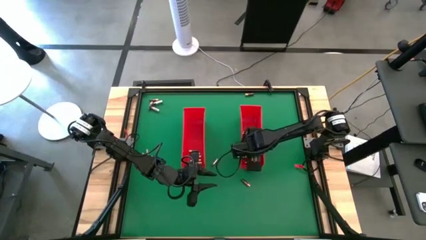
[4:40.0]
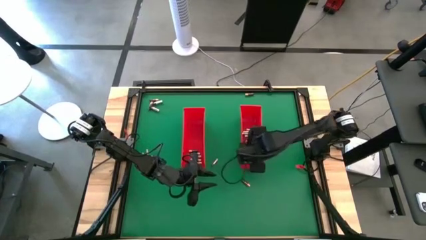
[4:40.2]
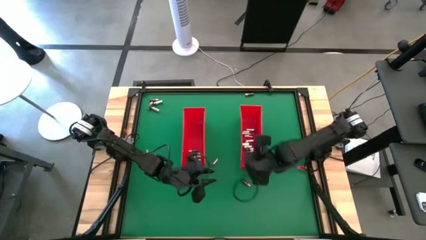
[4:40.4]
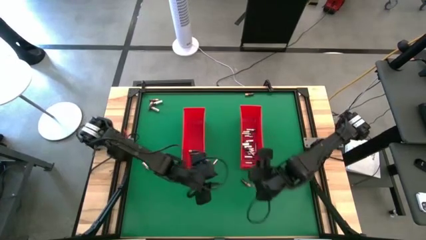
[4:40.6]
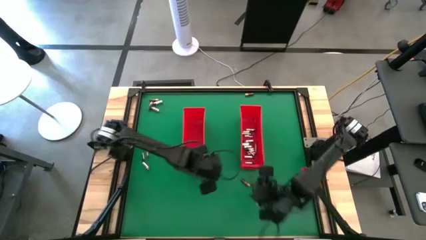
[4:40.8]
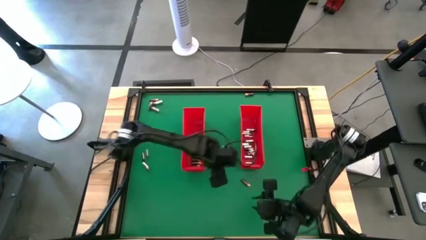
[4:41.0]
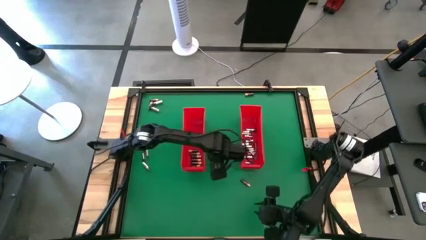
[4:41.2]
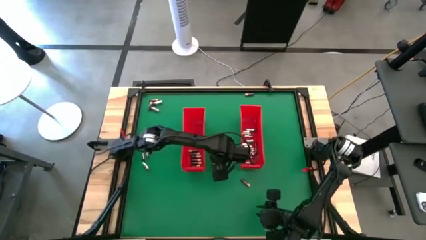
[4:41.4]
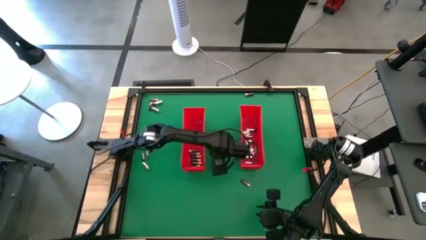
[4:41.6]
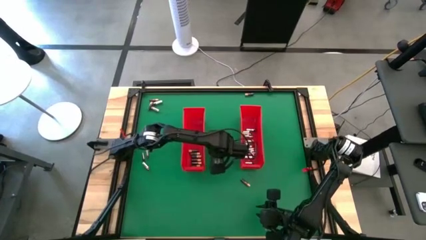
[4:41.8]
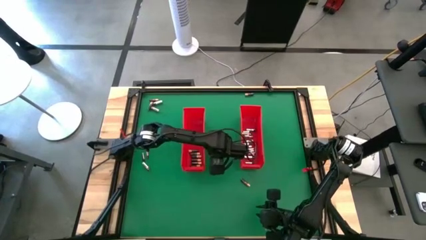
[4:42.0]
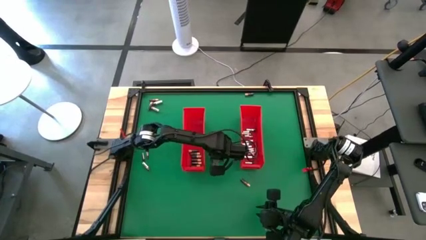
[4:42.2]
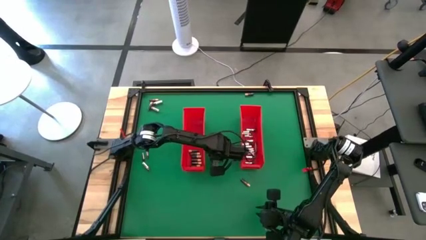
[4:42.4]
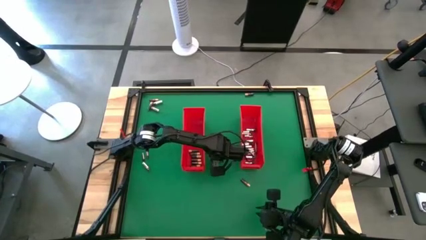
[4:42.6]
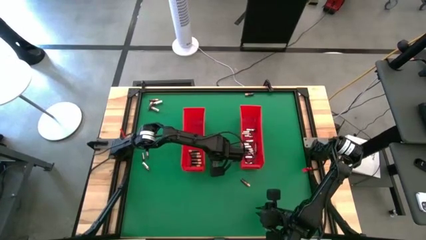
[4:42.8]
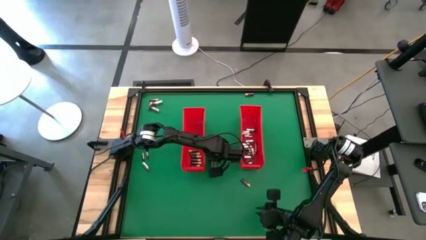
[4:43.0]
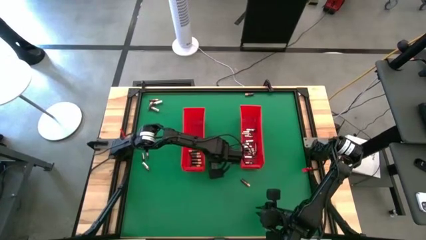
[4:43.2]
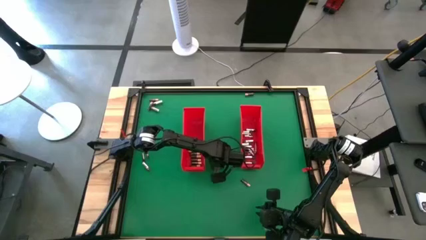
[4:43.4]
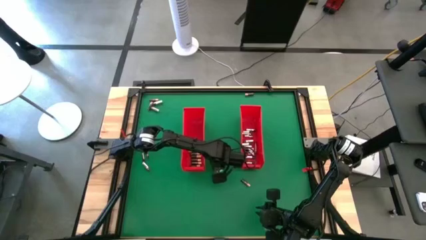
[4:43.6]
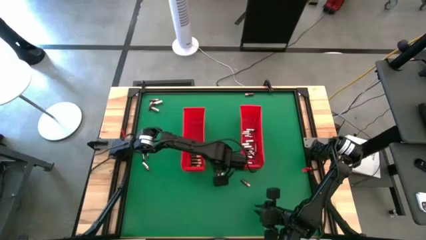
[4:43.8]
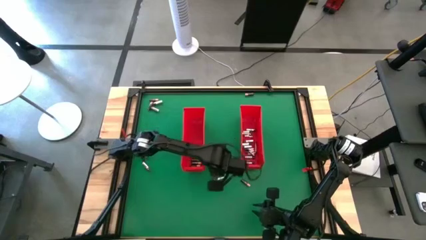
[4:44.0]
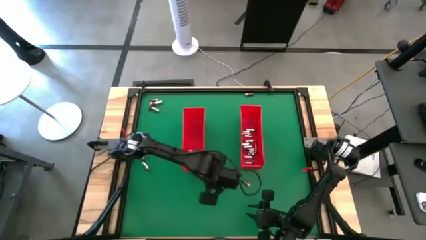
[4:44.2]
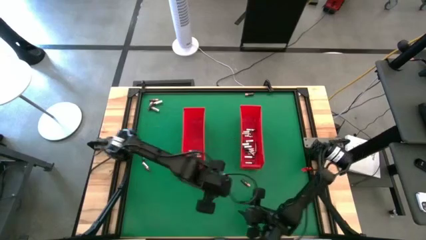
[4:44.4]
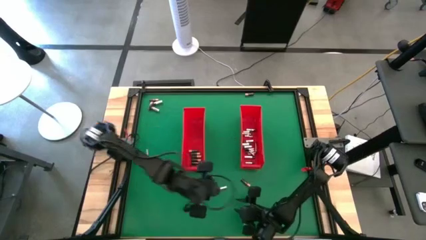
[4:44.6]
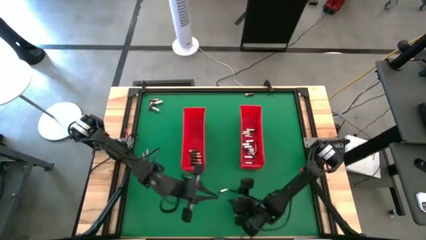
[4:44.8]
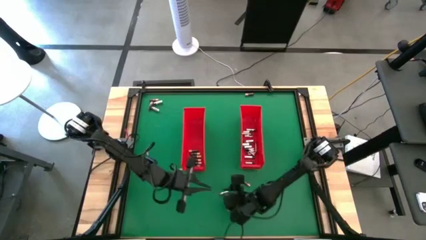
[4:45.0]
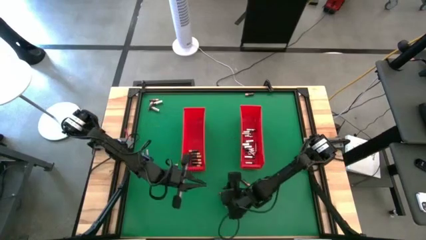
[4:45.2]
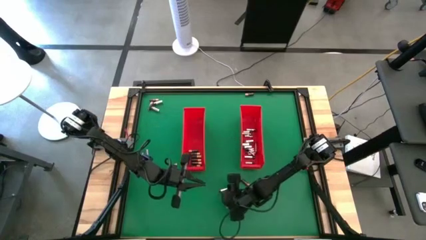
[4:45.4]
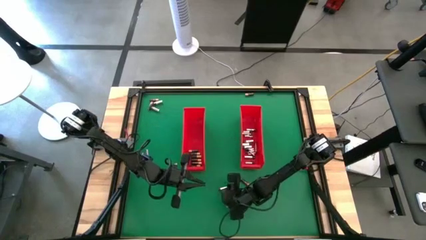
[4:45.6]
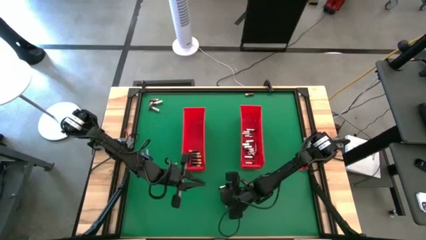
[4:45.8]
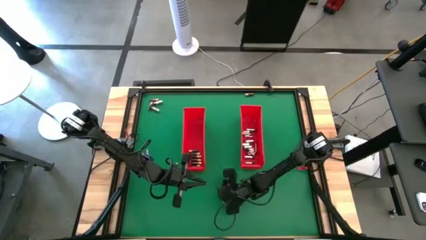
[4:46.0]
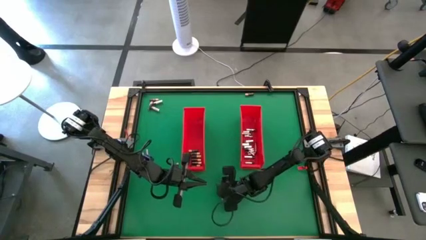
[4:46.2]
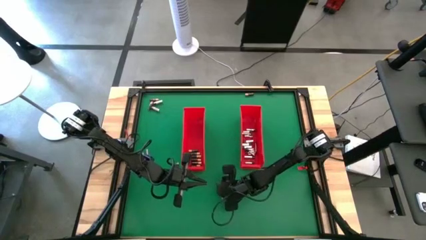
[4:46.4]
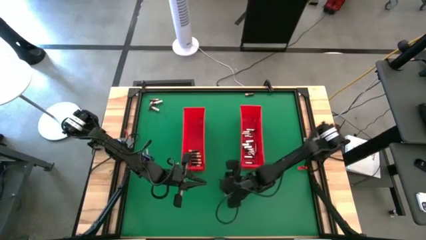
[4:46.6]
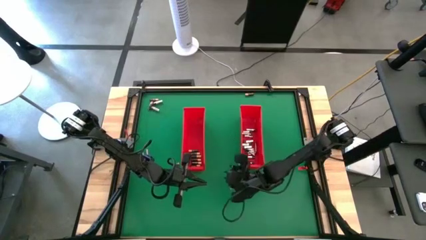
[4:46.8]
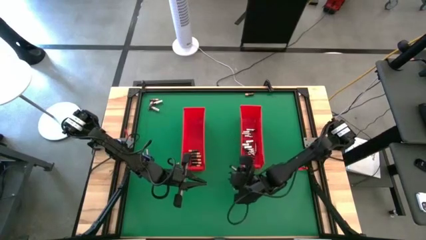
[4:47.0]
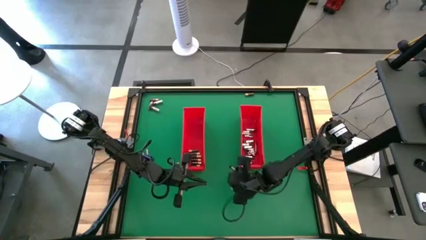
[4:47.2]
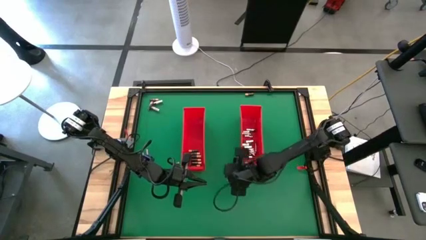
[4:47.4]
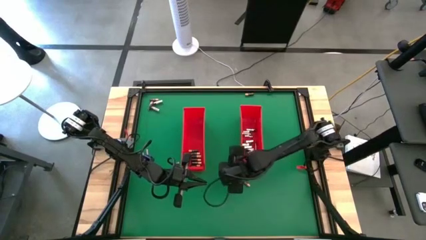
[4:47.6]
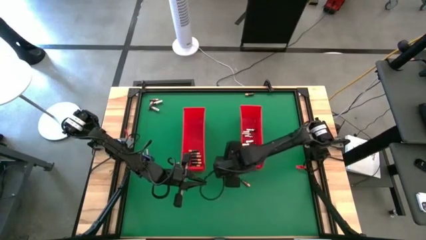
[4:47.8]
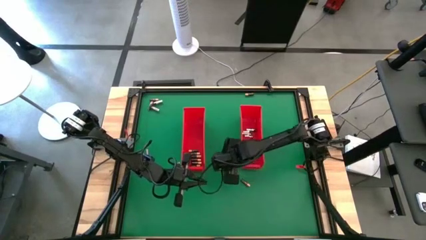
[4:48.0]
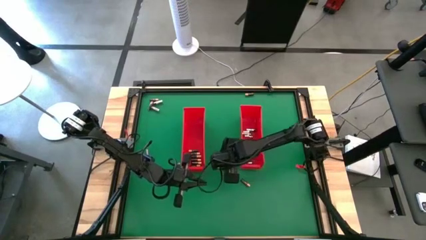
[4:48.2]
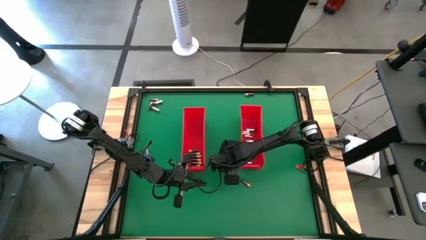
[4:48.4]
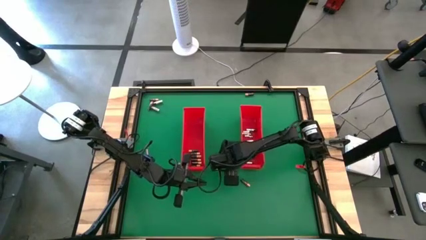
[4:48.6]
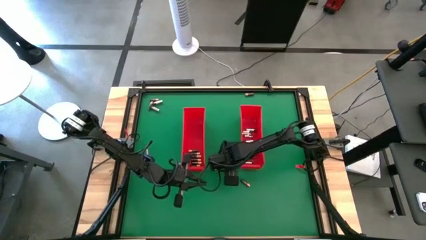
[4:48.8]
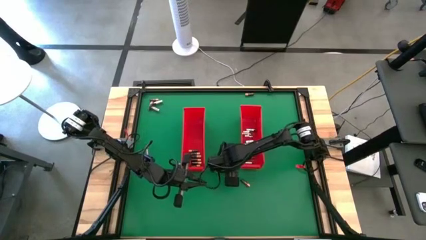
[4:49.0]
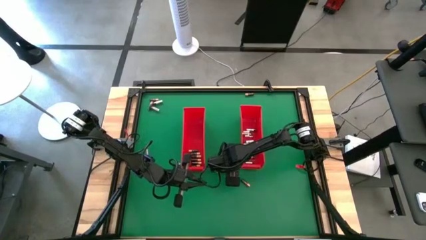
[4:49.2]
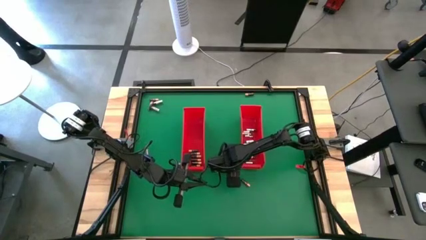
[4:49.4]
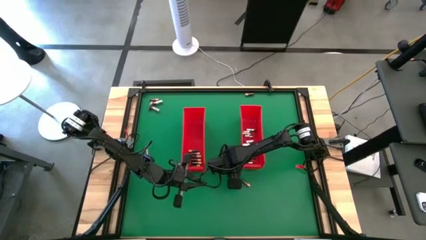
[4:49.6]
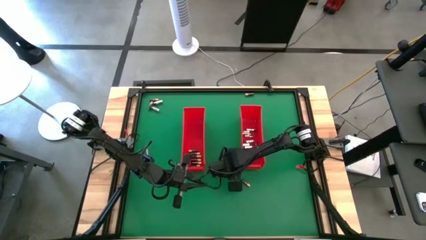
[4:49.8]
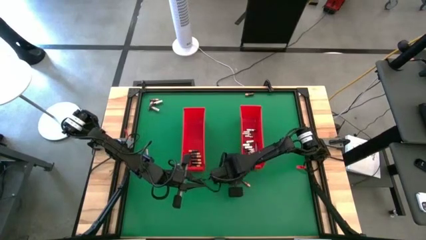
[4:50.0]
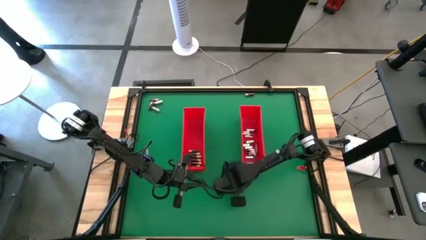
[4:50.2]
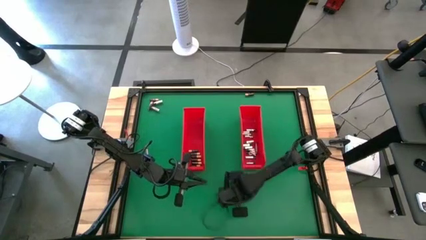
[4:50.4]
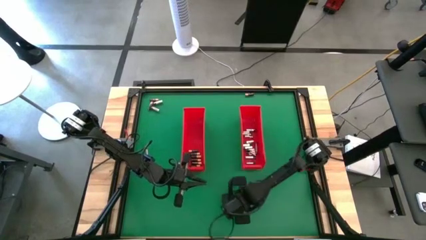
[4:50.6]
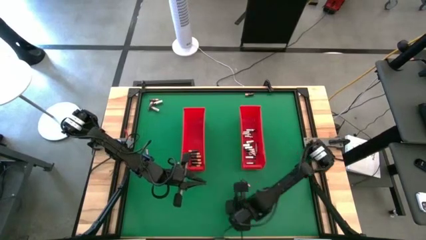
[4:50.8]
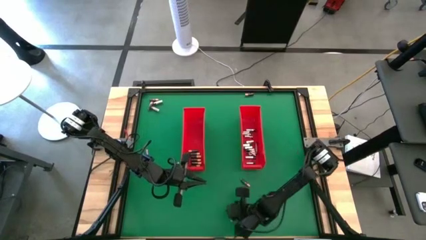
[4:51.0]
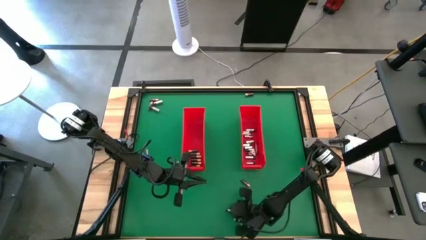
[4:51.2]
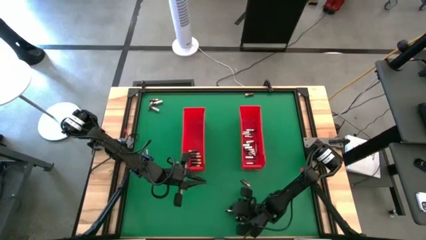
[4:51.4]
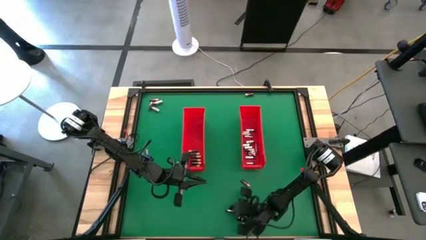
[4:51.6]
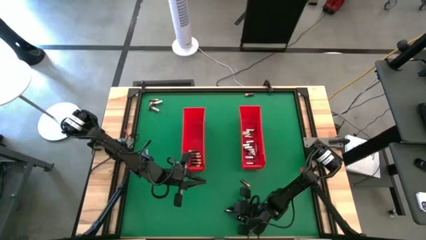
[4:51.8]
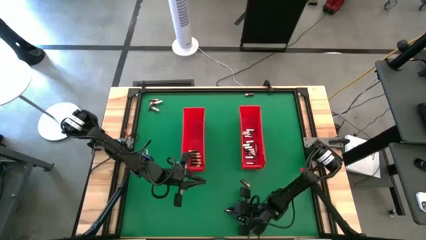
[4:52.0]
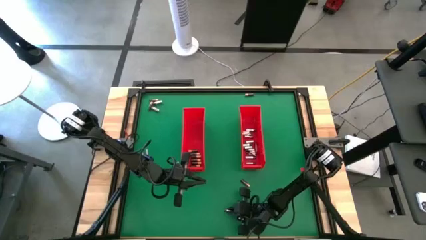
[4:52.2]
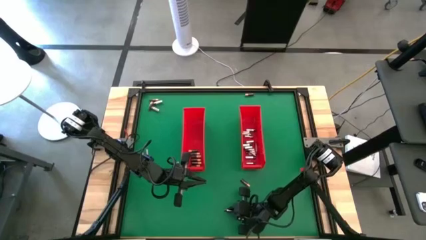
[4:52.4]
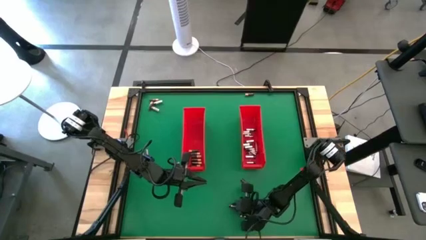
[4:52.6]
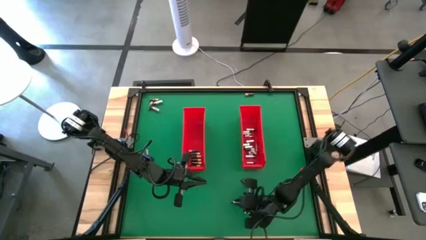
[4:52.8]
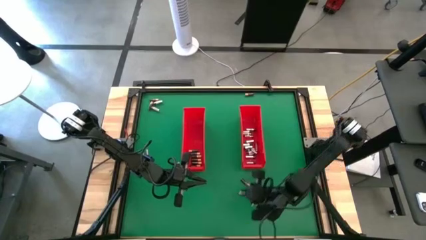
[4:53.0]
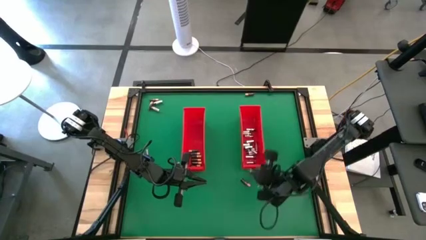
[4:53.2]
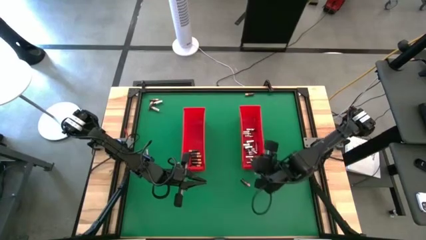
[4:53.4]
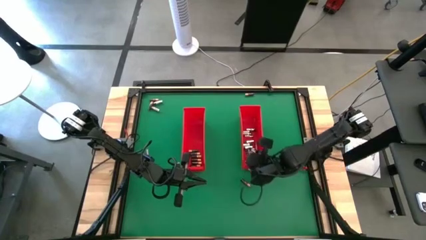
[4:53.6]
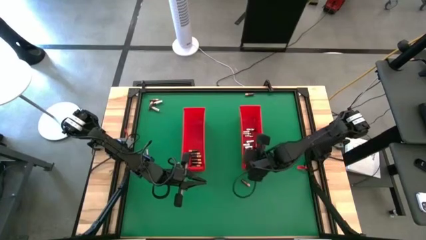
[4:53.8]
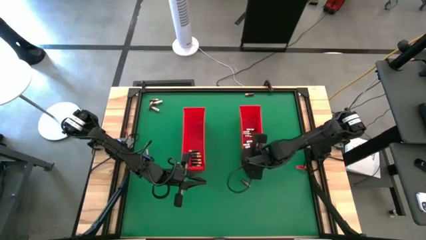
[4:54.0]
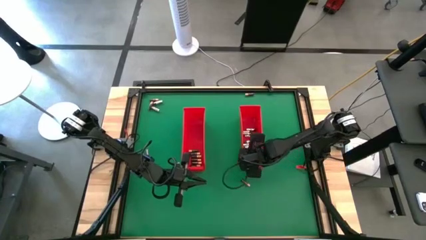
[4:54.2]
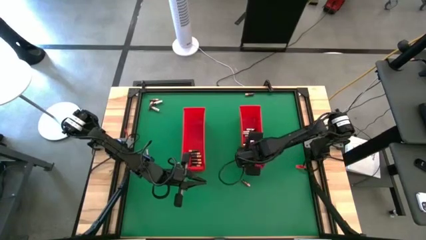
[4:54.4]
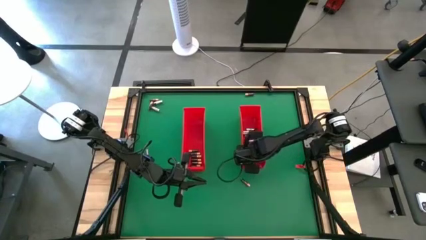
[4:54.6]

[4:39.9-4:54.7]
Task: Sort batteries
Put the silver battery into the right red bin
